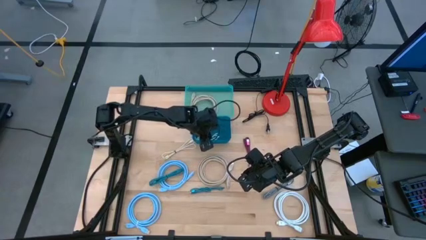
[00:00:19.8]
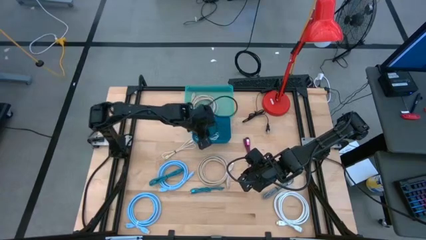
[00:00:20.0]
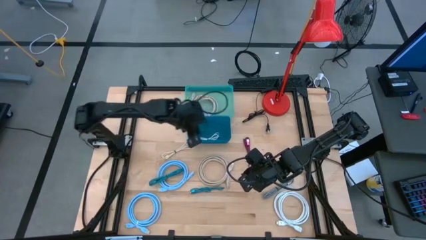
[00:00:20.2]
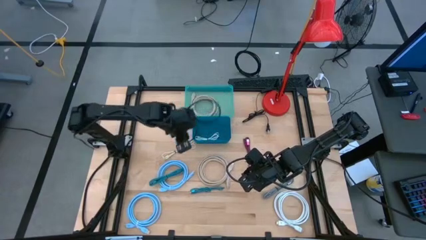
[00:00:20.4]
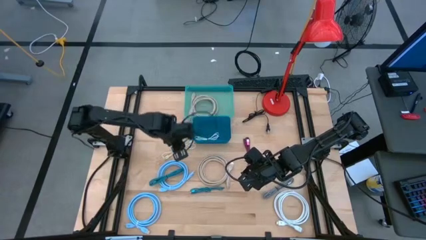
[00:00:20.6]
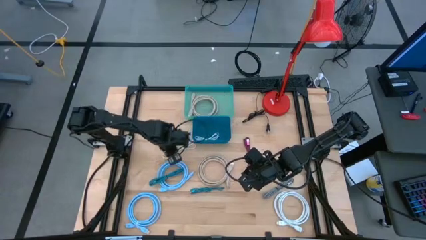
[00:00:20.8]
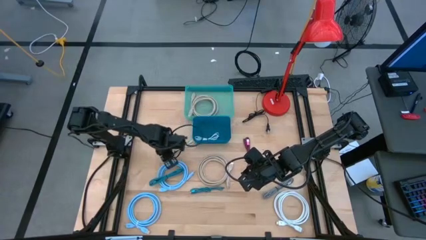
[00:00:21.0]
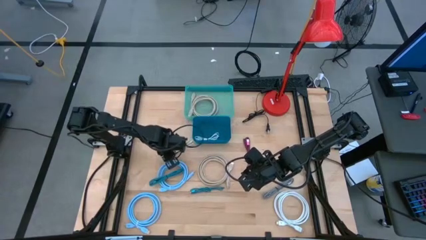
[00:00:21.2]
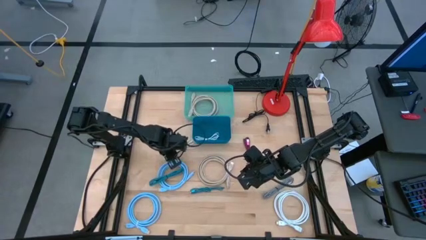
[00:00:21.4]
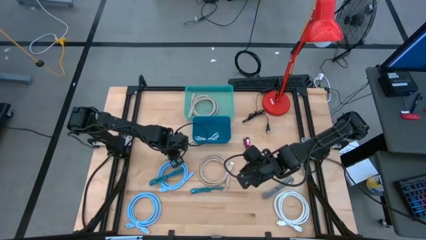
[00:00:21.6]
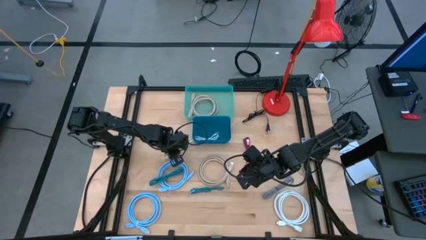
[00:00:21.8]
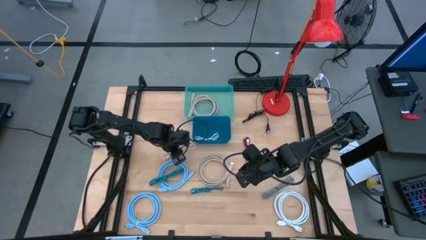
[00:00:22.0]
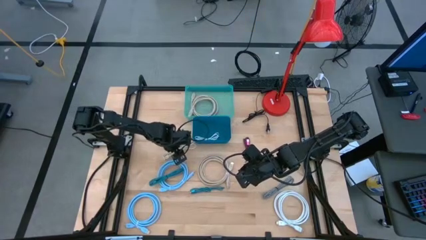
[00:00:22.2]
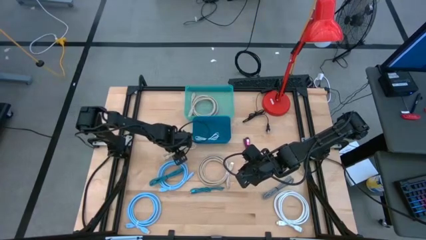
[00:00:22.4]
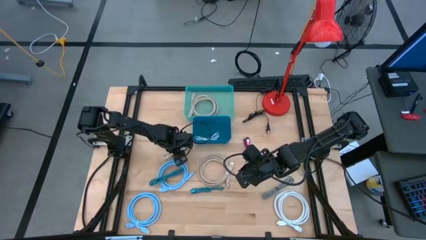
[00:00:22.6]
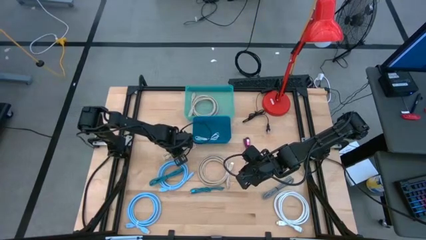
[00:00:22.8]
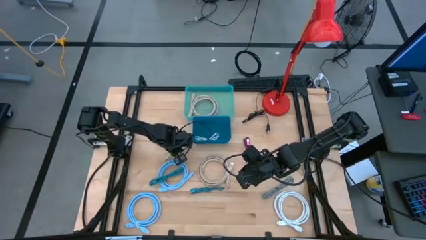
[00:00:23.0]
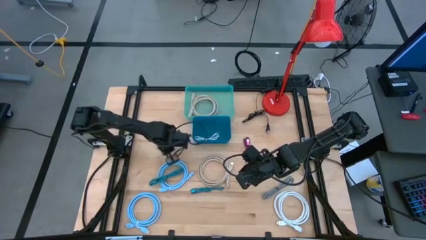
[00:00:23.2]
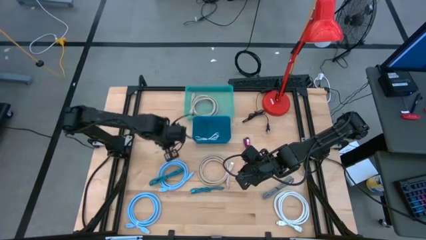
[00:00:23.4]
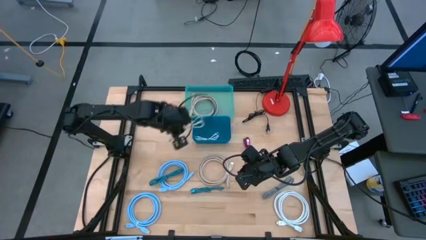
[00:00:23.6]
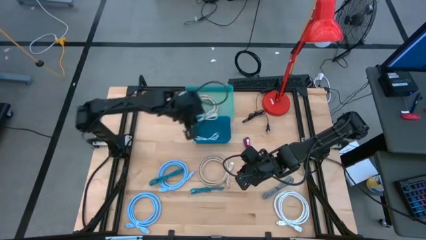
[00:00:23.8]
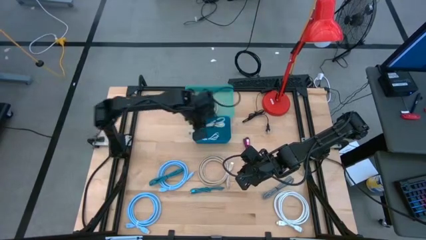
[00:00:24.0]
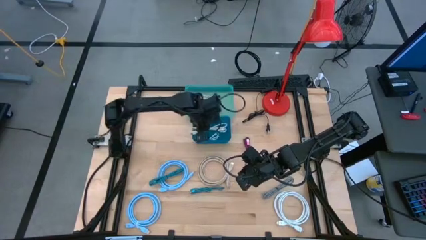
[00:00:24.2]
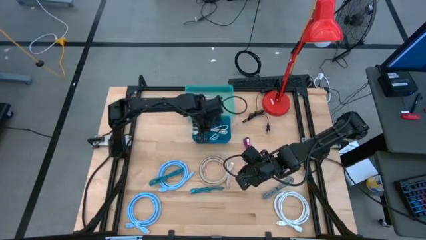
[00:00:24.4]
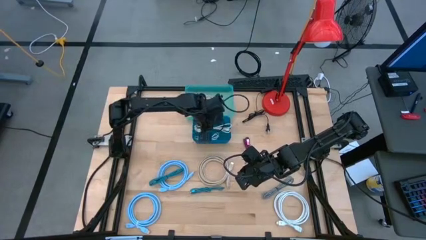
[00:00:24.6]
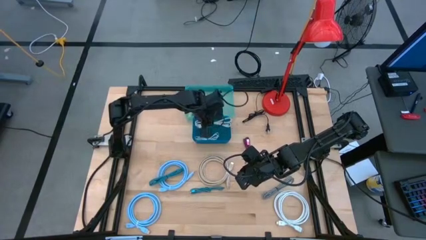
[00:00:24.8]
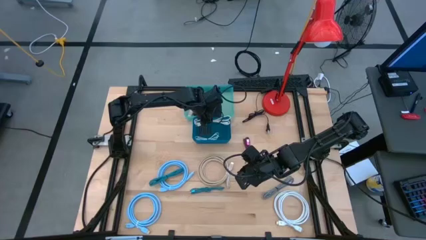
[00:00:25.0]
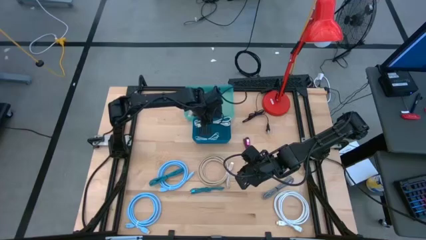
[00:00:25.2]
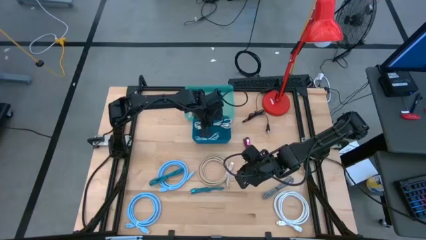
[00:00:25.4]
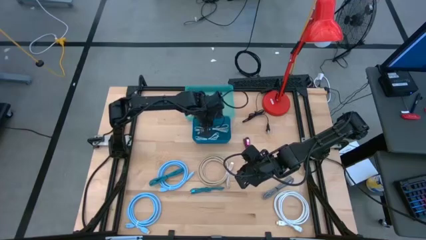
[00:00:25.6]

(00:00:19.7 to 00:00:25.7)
Task: Pick & Place USB Port
Put the brown charger cable into the blue bin

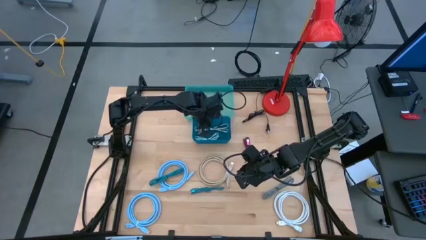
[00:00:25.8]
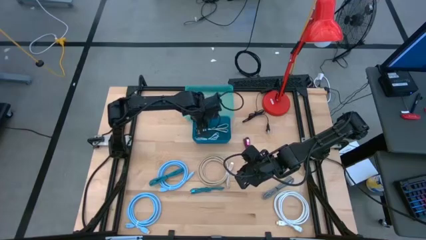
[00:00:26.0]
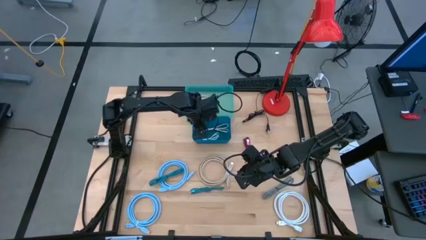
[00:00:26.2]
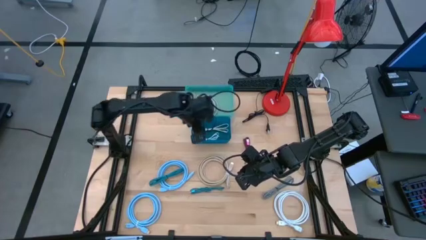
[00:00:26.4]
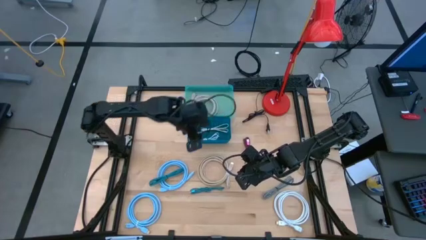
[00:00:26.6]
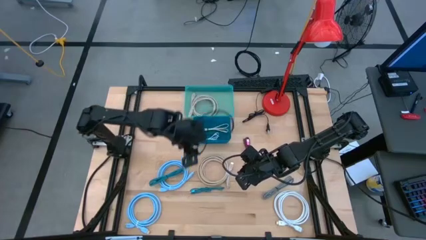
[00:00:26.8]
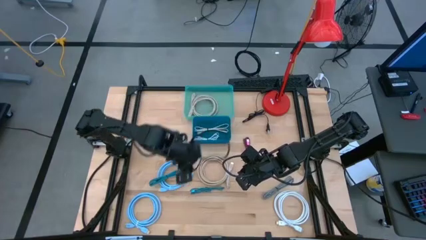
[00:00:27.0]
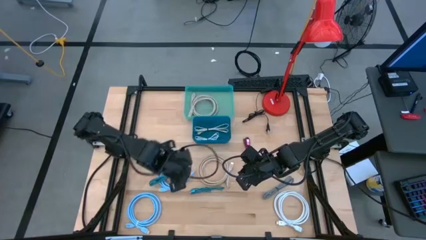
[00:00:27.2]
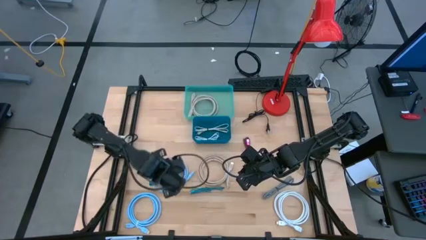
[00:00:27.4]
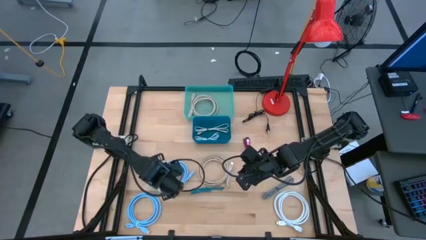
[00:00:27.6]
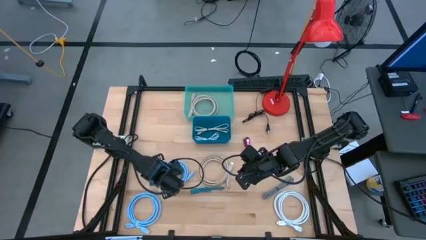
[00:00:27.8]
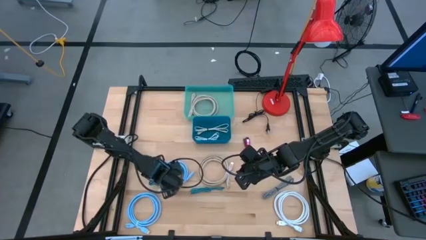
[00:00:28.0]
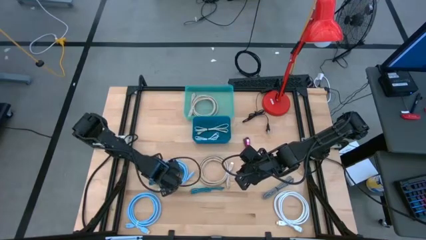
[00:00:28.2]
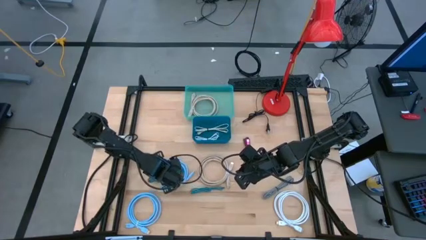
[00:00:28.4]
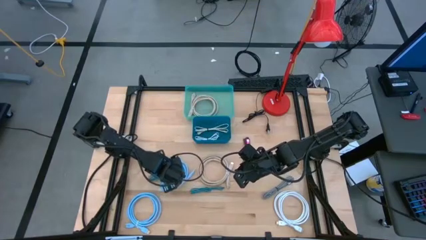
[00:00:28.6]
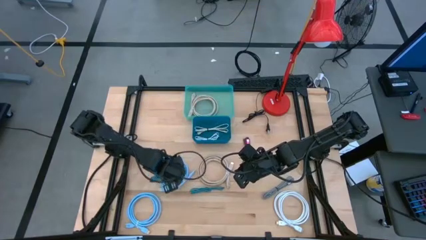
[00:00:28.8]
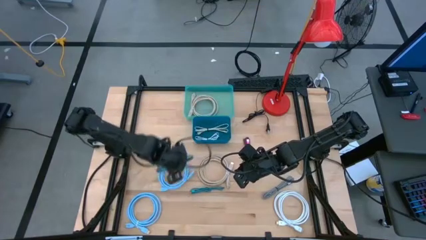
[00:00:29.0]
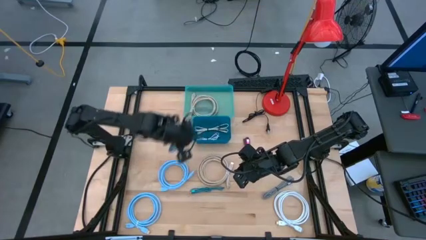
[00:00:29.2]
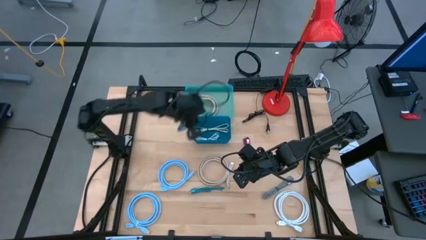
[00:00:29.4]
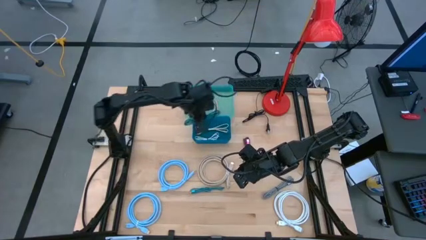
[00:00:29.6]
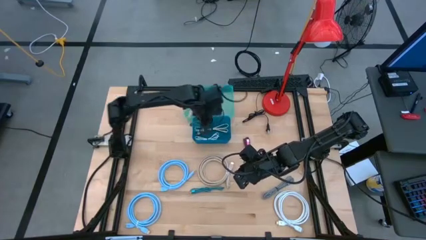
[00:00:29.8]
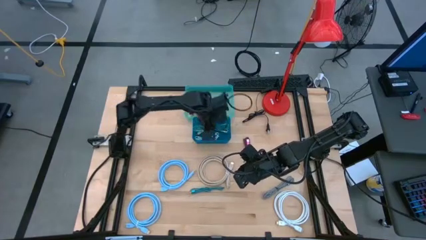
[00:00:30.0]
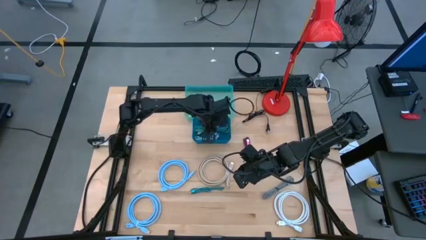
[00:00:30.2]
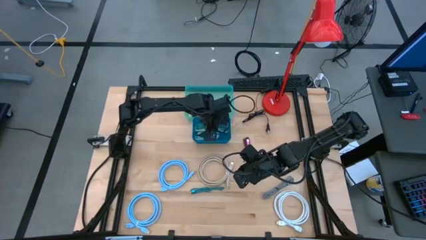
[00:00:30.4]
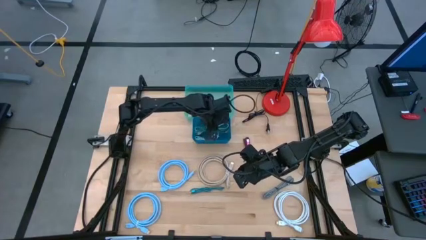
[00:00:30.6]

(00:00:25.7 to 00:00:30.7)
Put the top blue charger cable into the blue bin
